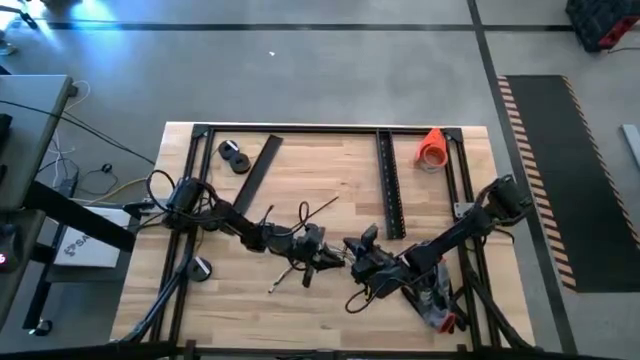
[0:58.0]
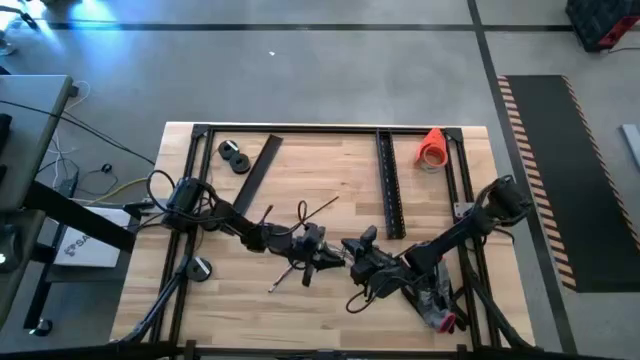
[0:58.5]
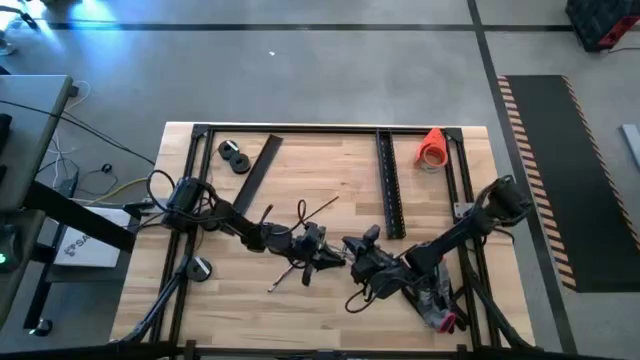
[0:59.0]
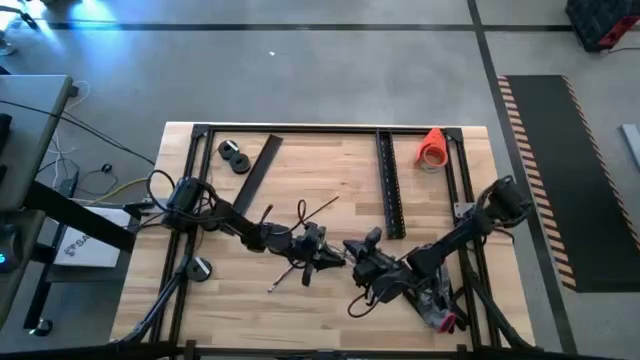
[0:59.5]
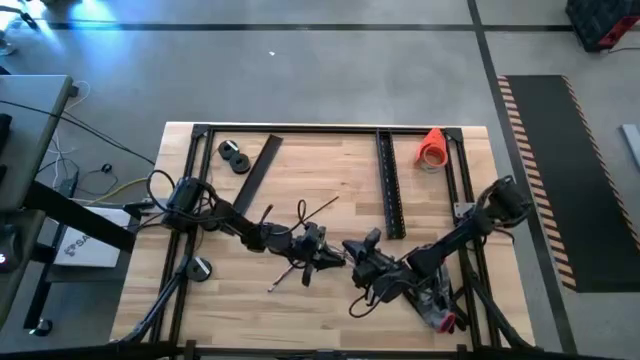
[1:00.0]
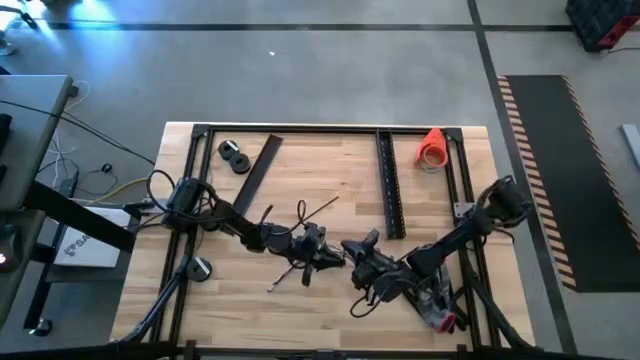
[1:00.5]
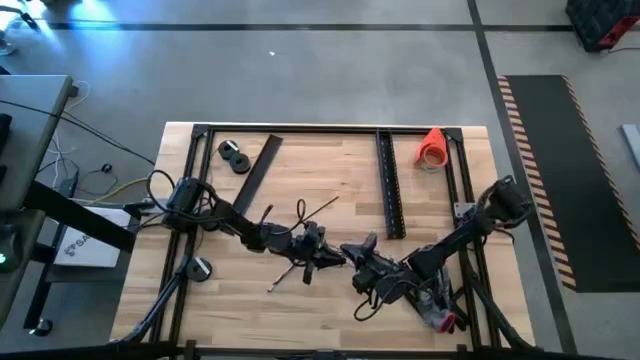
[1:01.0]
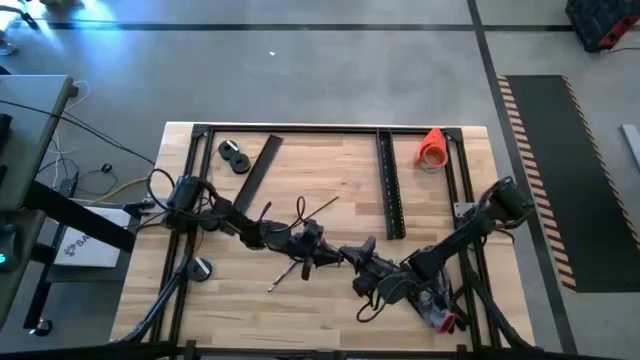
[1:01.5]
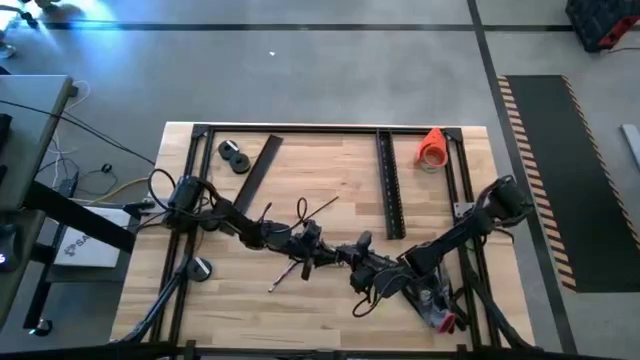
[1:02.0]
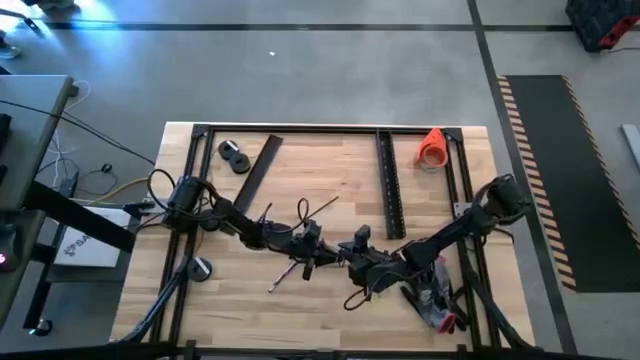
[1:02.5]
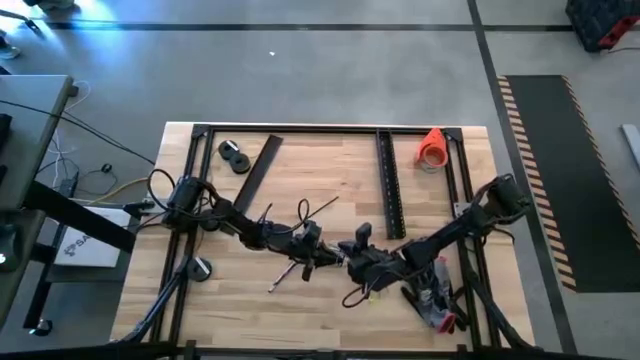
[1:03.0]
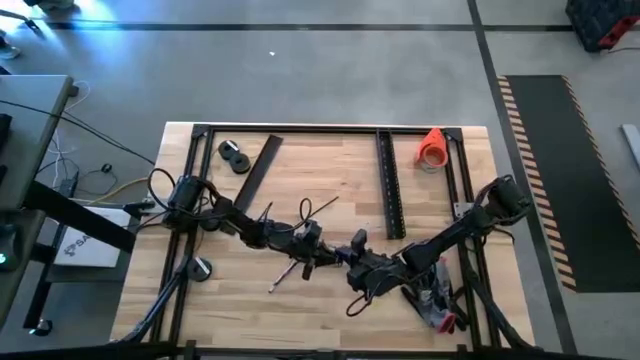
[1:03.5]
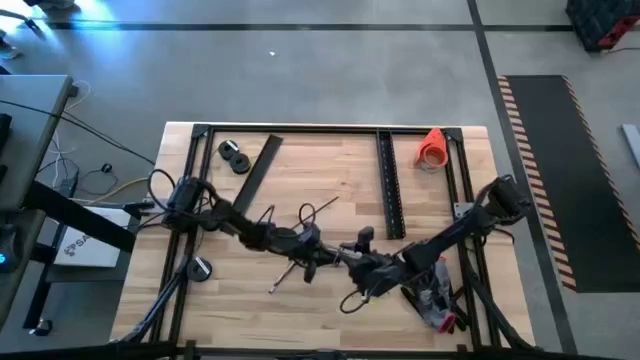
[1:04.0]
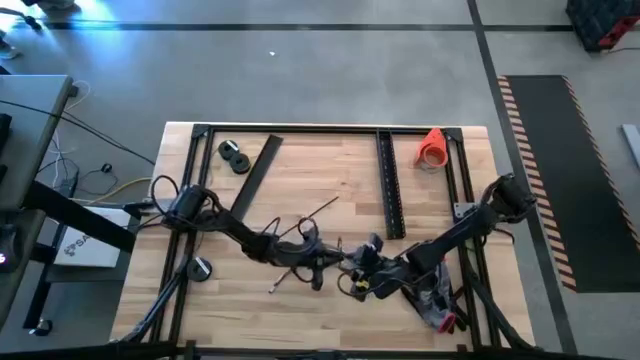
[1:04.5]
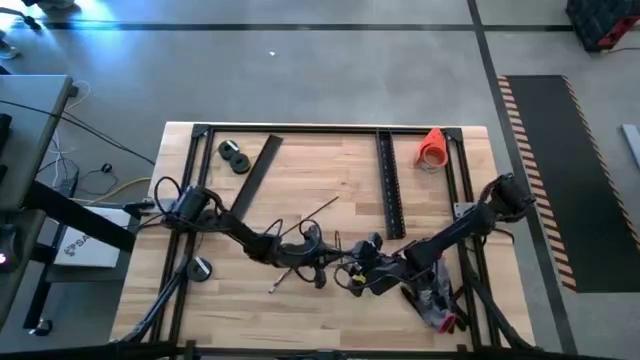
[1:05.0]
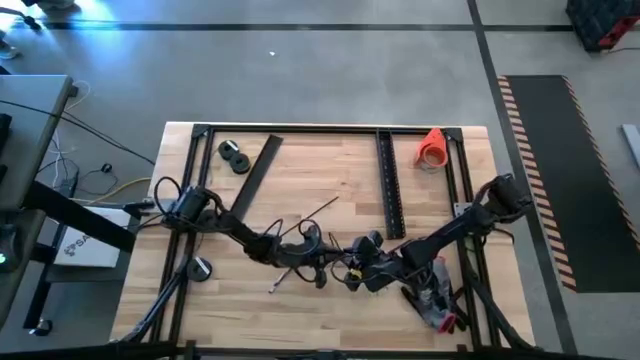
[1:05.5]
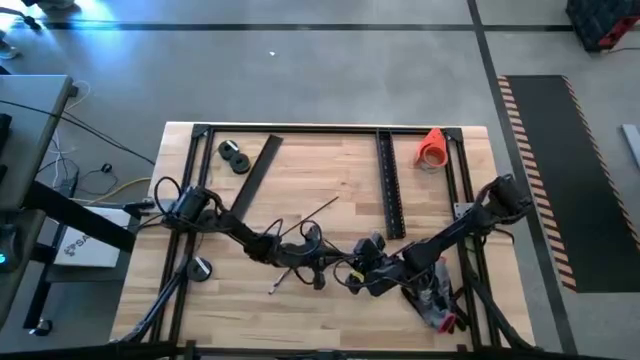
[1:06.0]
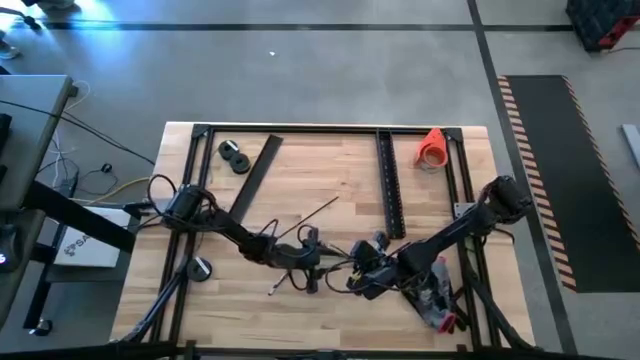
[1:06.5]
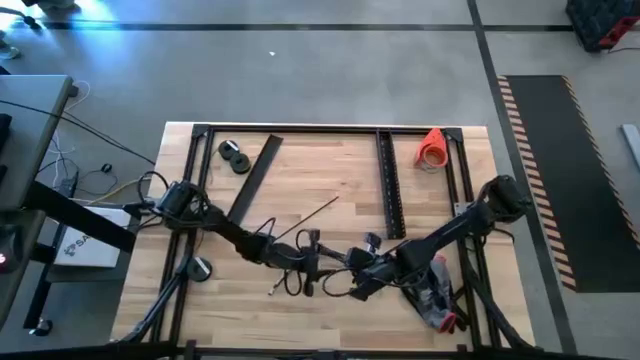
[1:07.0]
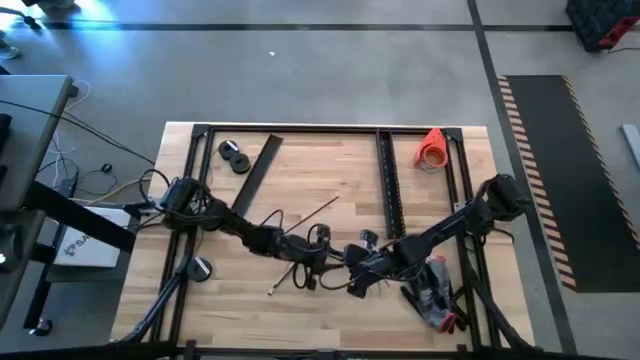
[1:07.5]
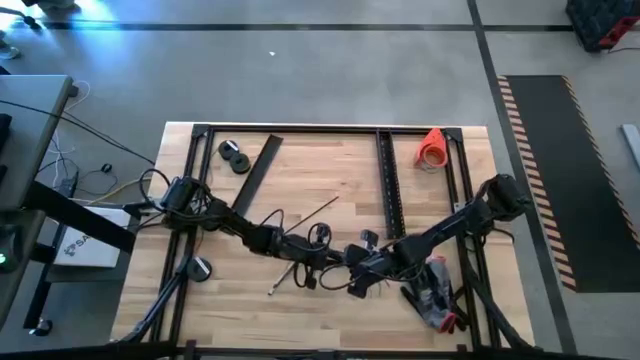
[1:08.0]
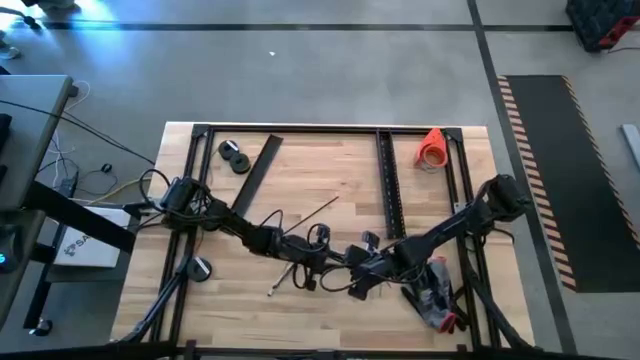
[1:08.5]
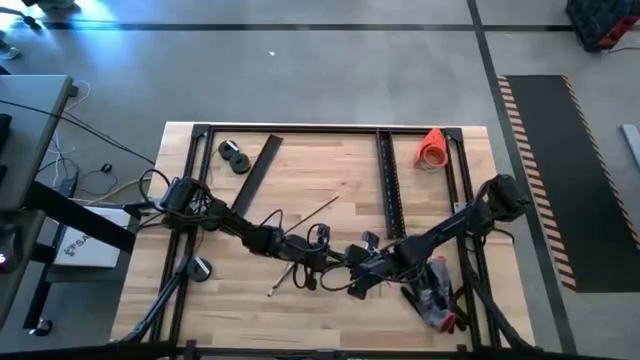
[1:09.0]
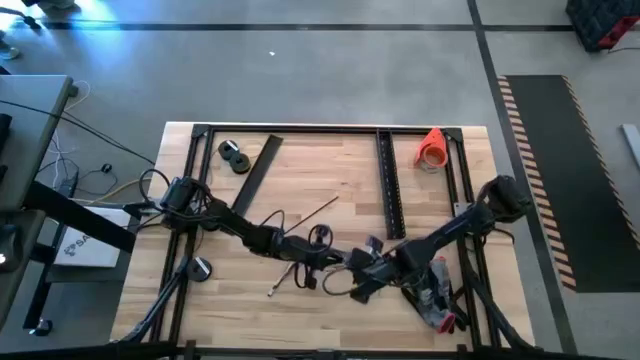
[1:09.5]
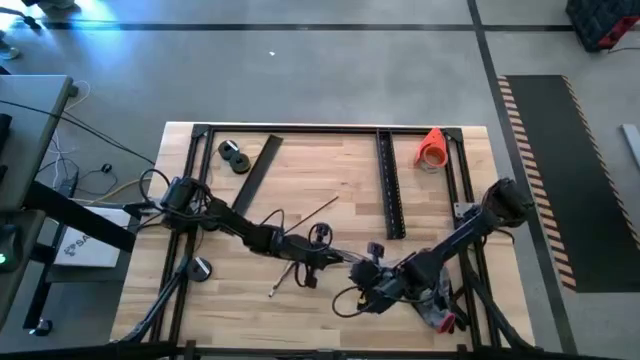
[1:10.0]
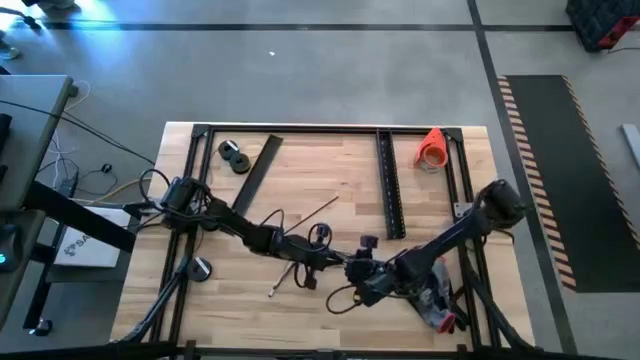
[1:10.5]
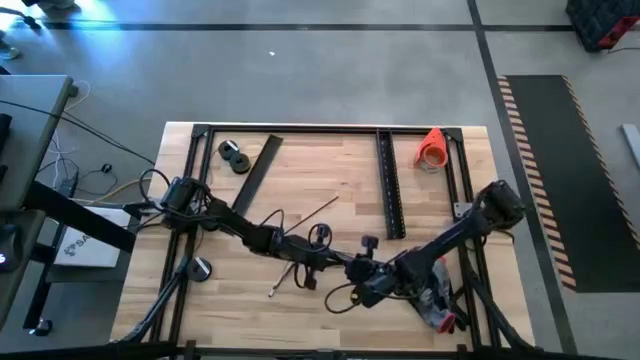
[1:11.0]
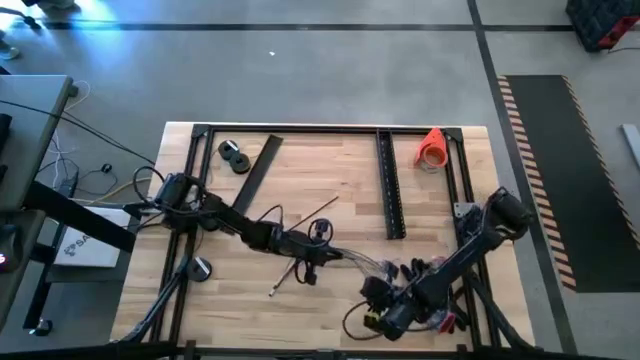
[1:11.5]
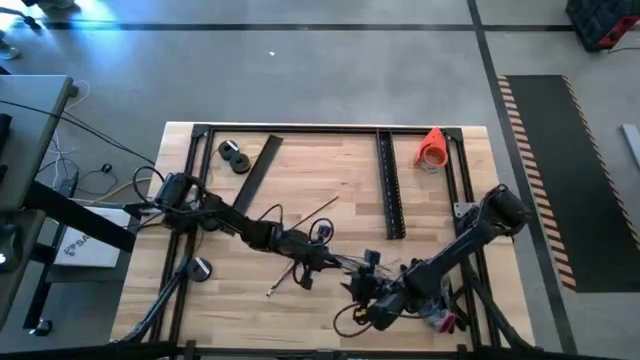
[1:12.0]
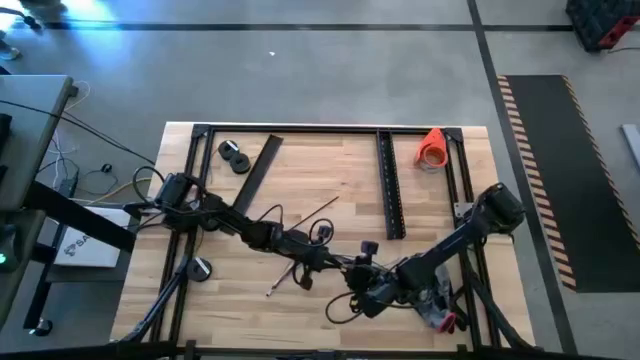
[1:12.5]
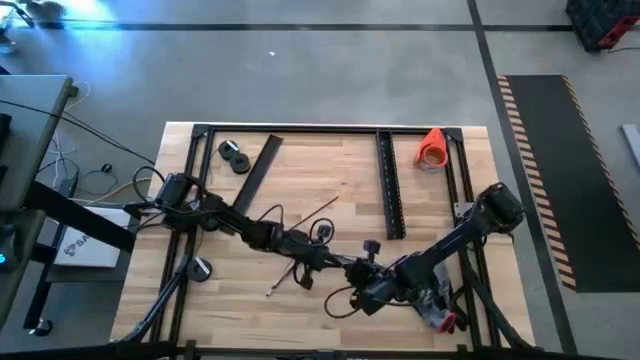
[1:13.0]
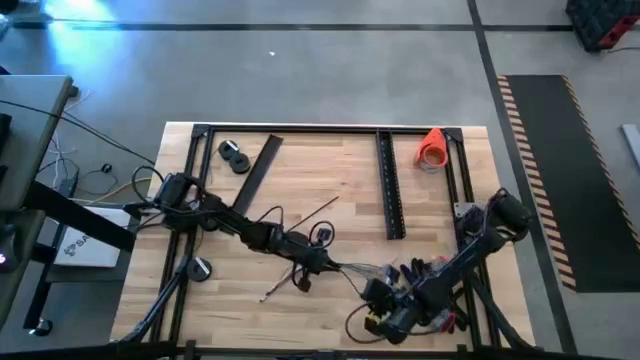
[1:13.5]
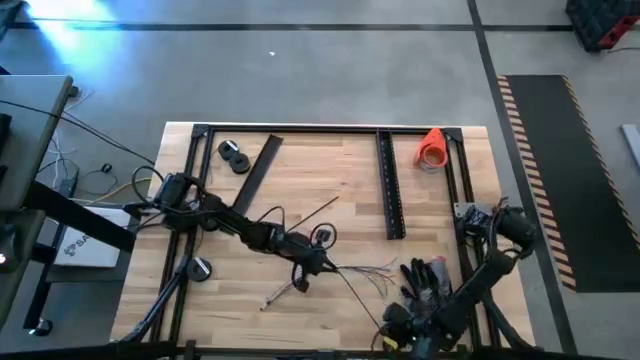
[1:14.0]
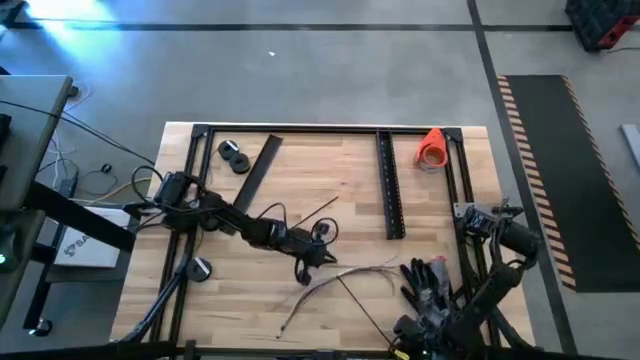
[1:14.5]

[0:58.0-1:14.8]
Task: Ziptie cables
Wrap the left black zip tie on the cables

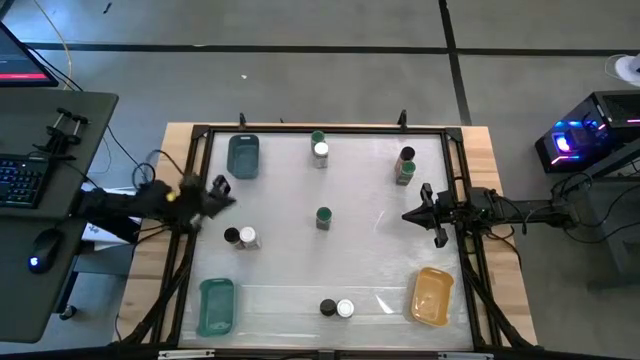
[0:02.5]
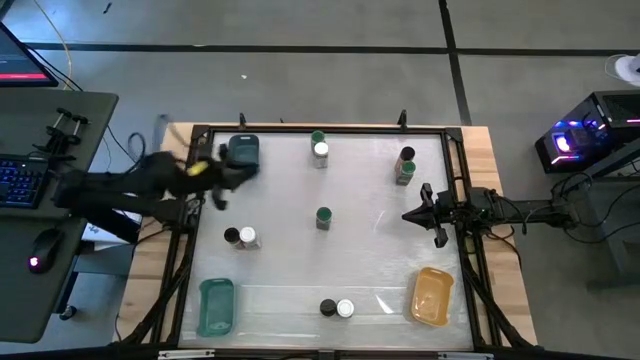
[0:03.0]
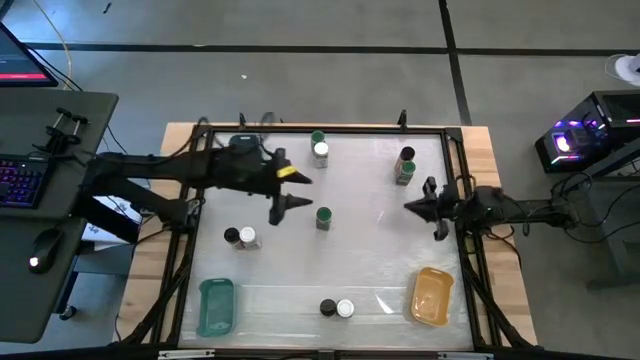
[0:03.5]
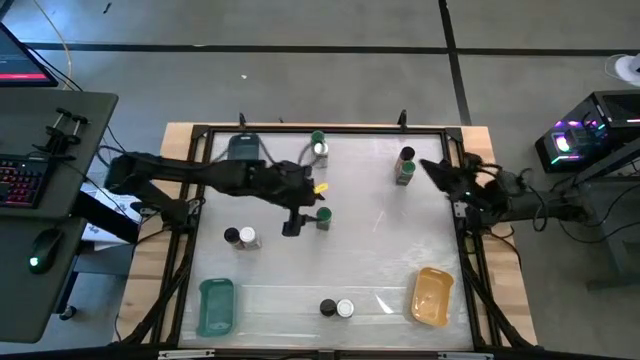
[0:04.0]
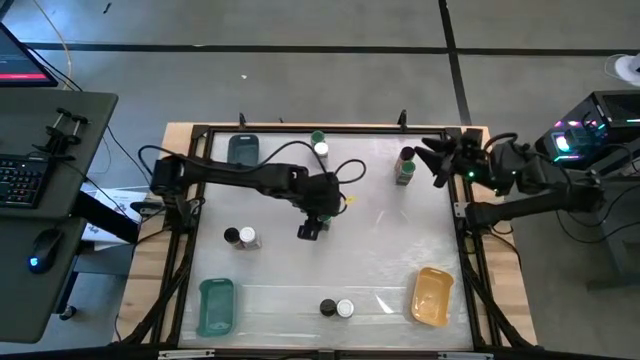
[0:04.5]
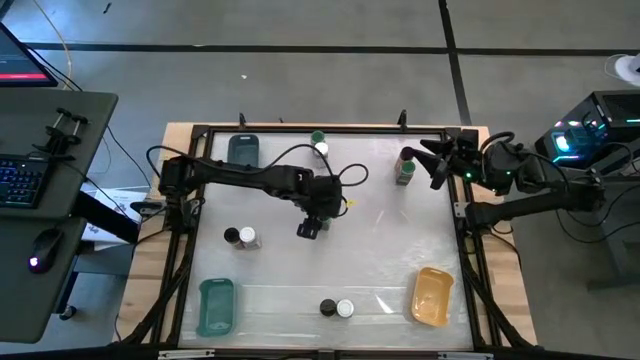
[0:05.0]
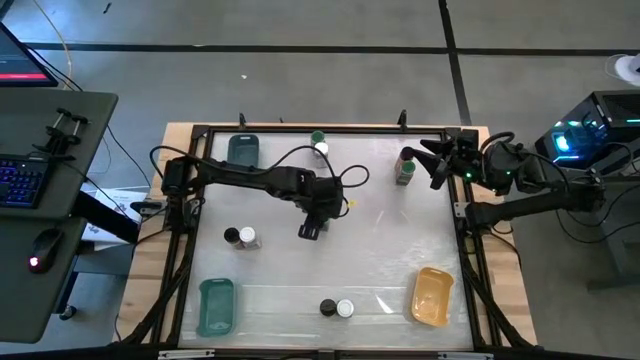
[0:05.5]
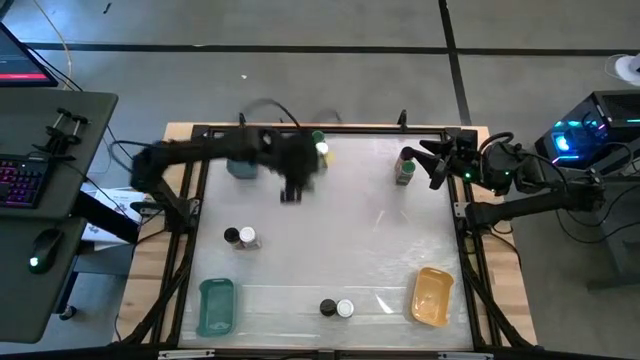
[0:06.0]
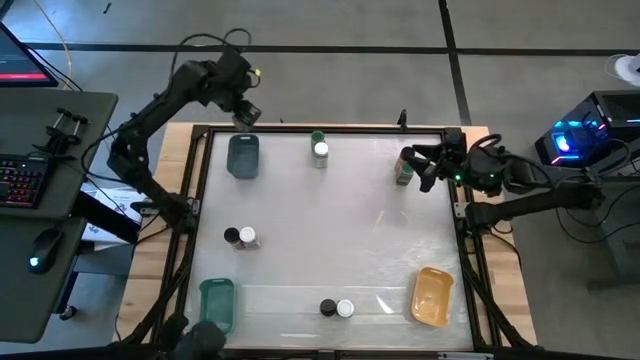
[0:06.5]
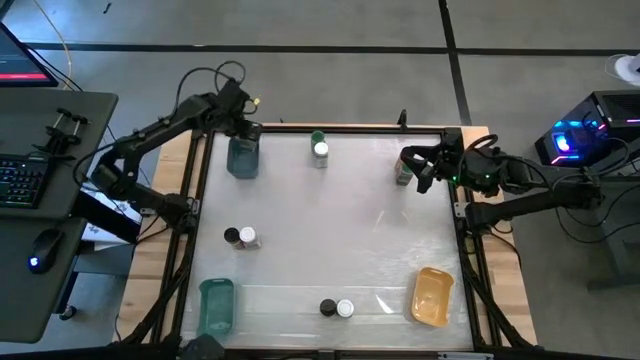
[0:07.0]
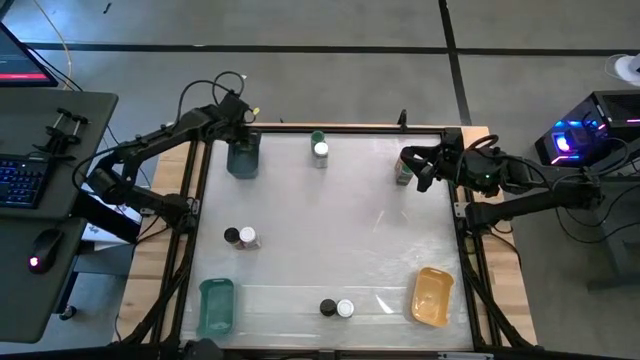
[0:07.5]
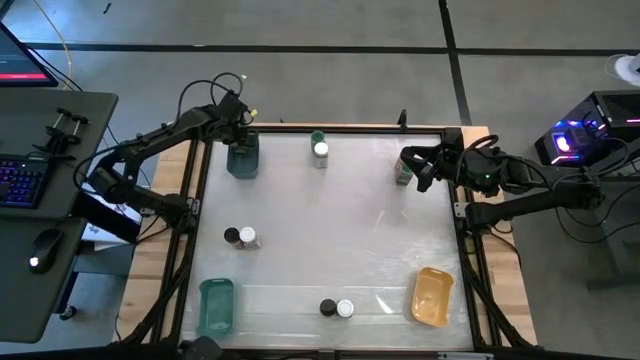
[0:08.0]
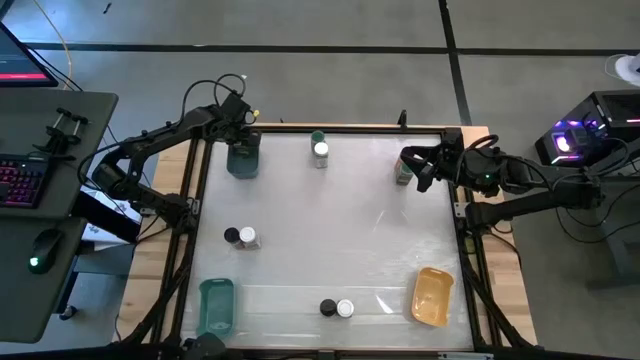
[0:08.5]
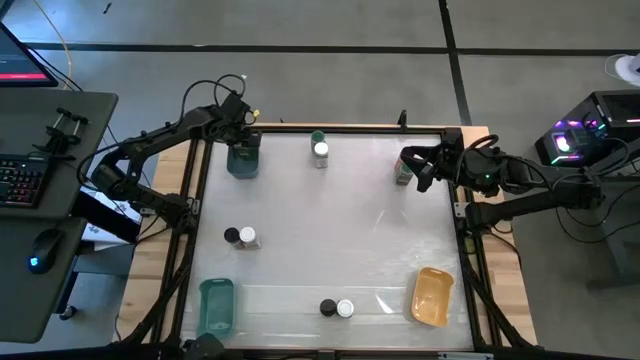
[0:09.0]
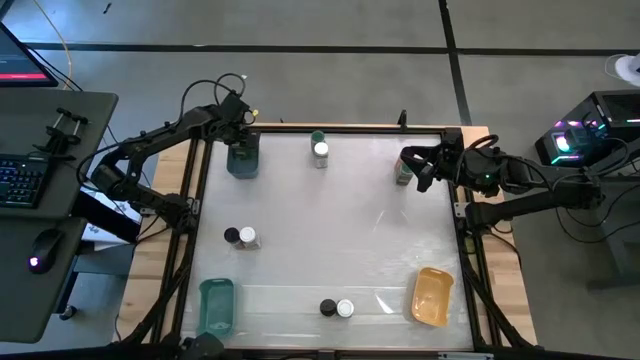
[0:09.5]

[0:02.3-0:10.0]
Task: Sort spices by type
Put the bottom left green seasoning bottle into the blue bin
